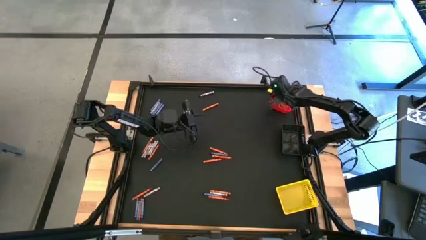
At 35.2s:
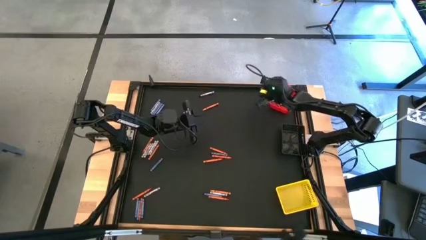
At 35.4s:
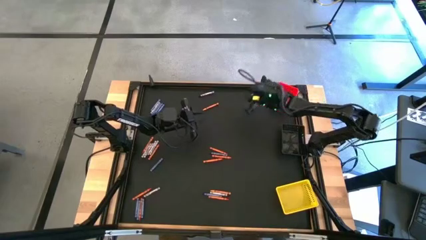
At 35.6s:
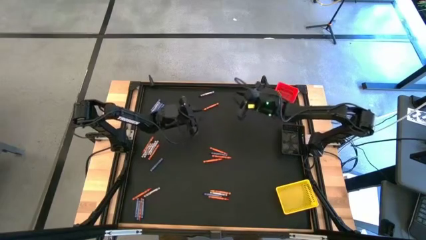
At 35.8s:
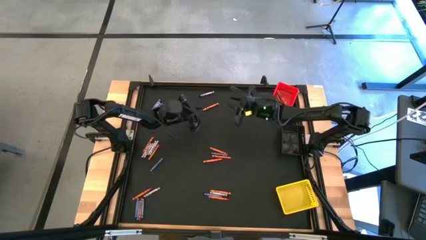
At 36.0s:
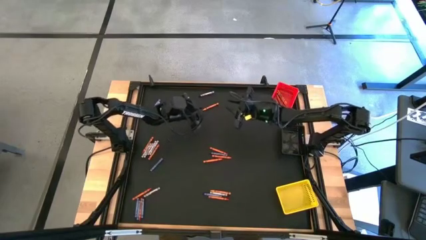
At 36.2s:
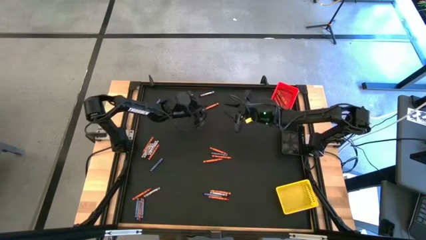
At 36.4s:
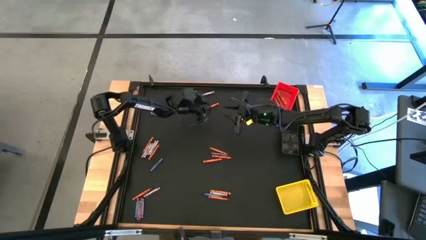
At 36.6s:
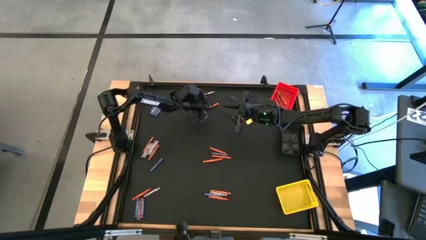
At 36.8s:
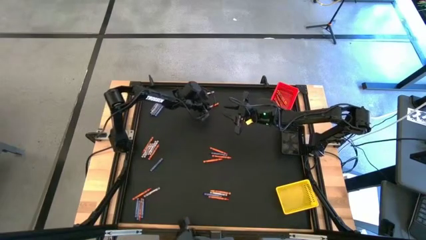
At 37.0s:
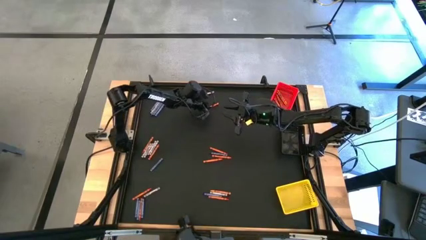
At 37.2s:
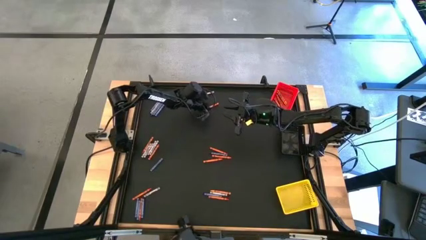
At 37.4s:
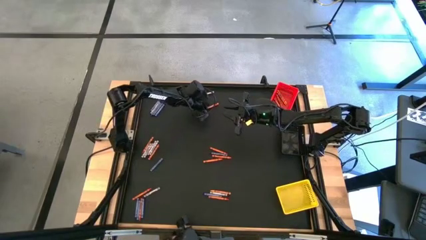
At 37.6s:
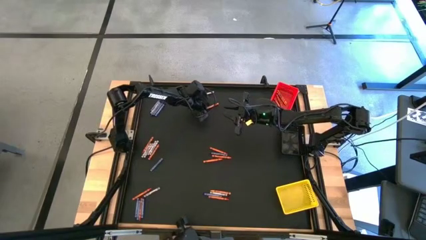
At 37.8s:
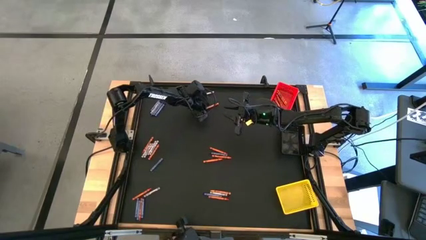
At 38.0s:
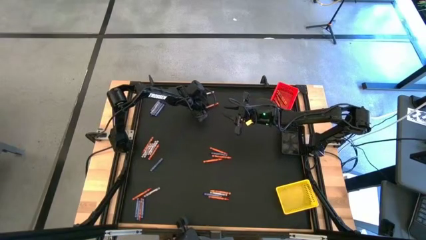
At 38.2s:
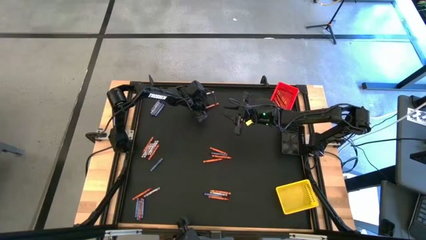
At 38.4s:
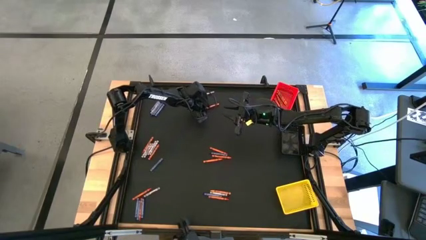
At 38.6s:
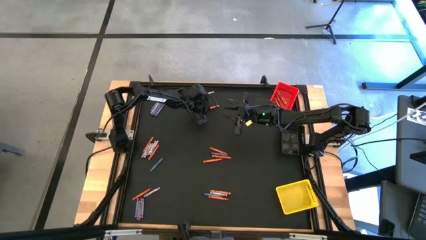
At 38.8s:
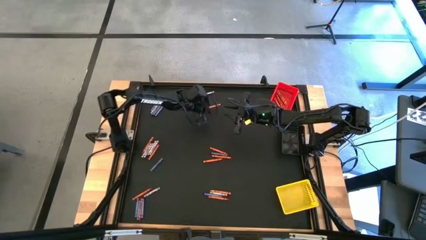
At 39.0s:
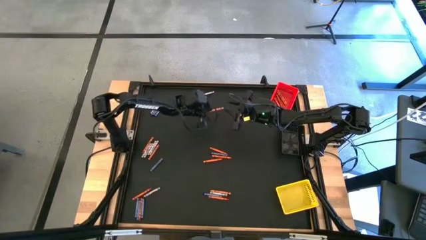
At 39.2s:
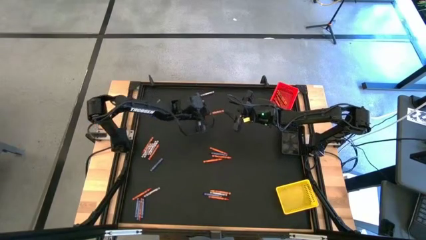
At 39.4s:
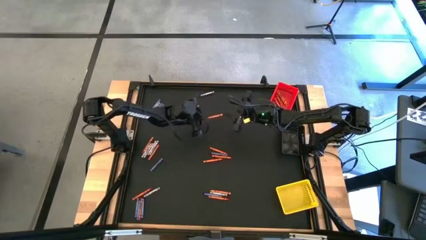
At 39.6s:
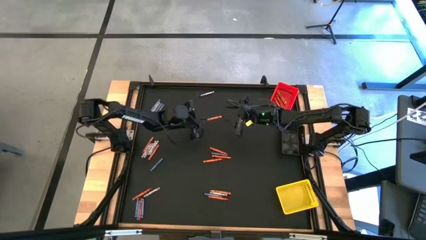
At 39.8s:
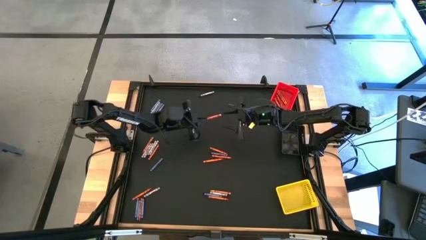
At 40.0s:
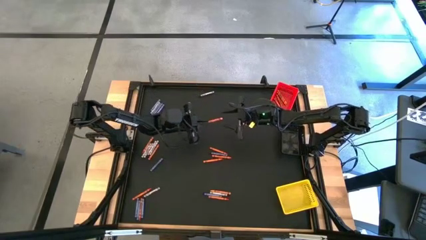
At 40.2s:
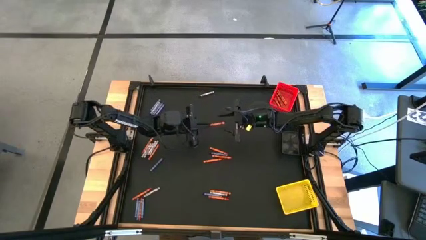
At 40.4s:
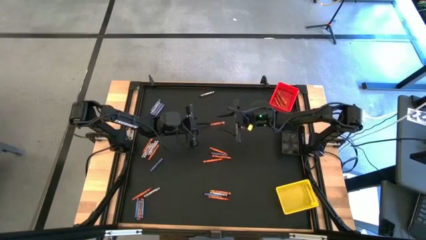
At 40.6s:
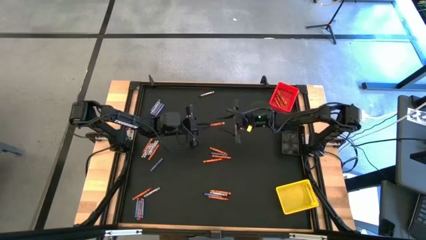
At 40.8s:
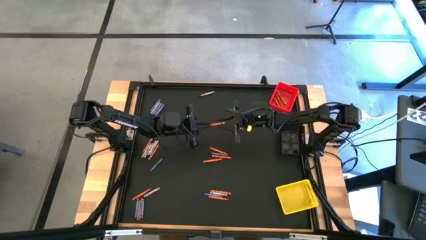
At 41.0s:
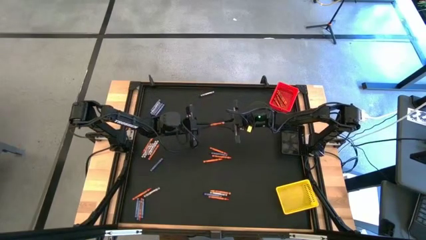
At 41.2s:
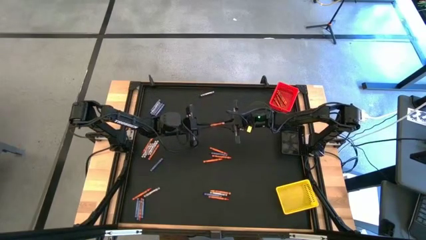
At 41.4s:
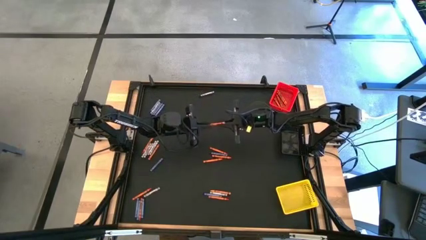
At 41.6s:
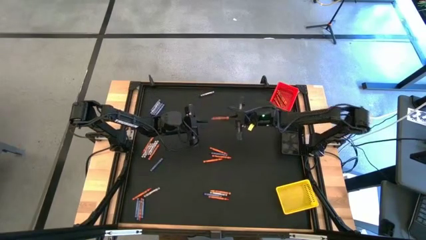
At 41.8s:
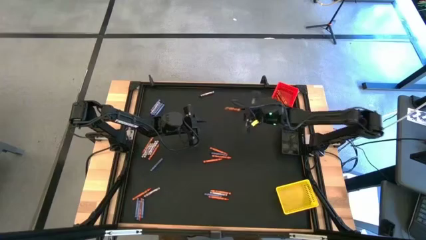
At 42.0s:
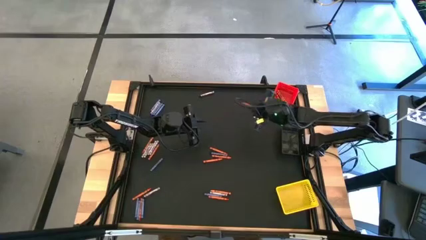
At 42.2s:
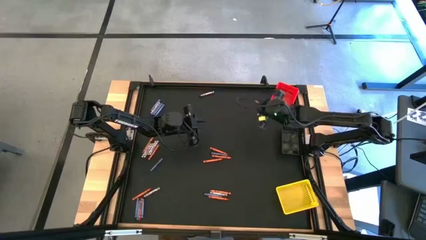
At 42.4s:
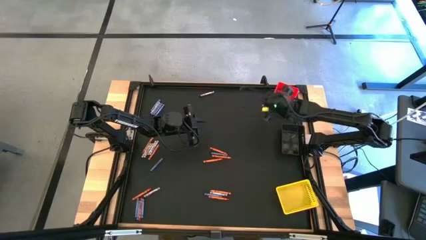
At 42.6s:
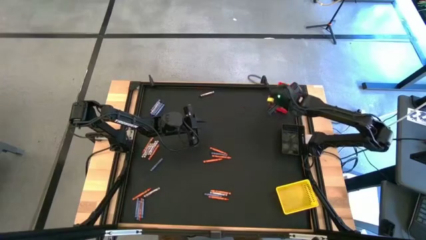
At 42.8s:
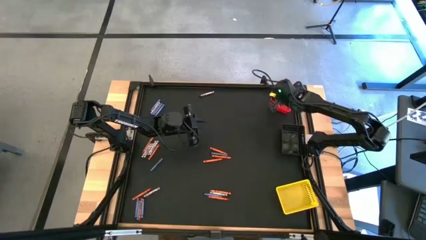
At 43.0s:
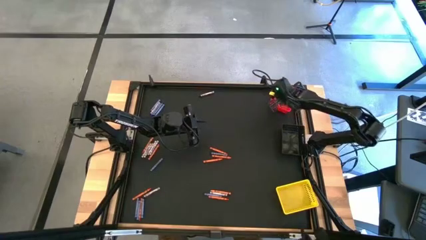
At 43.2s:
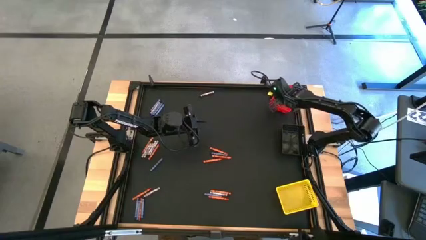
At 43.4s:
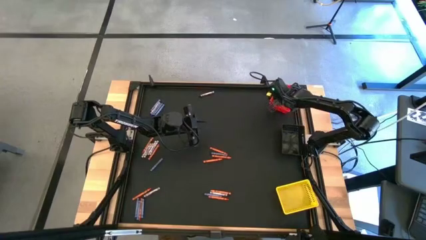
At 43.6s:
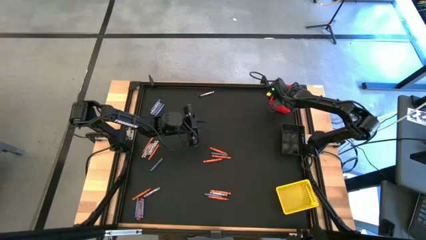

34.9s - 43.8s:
Task: Sort crayons
Put the orange crayon into the red bin

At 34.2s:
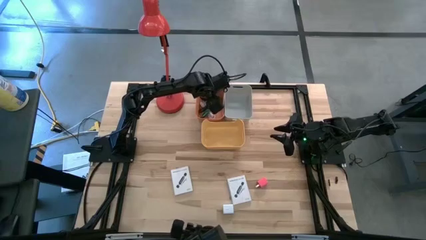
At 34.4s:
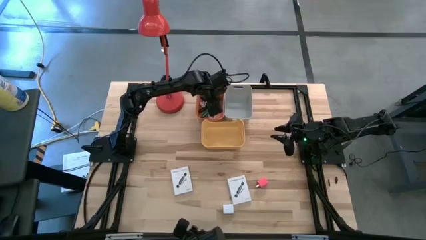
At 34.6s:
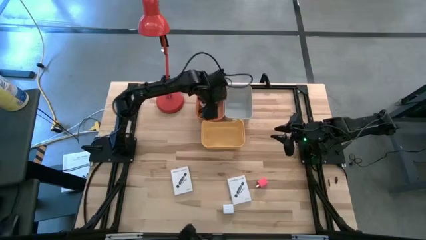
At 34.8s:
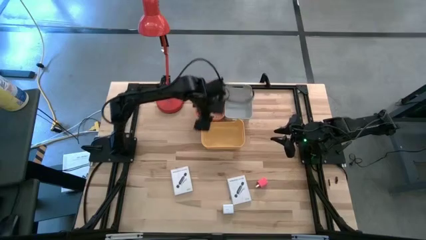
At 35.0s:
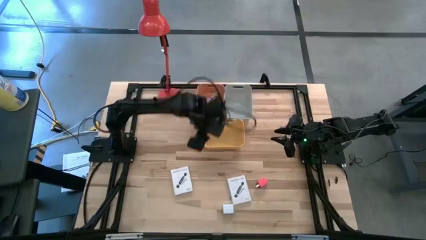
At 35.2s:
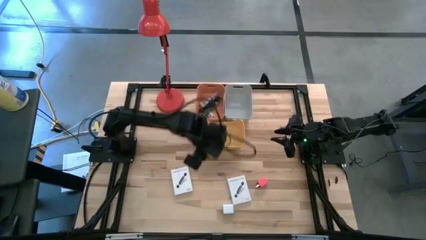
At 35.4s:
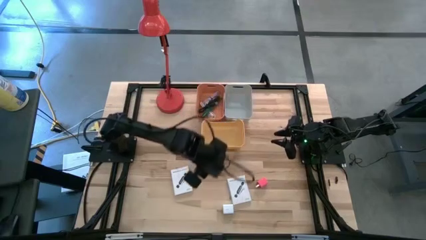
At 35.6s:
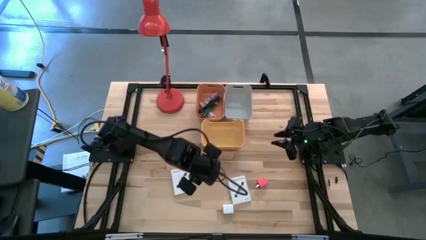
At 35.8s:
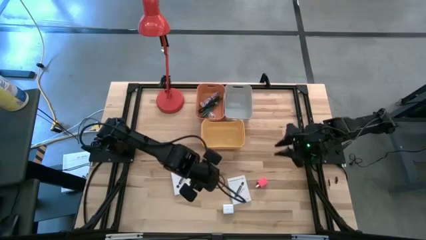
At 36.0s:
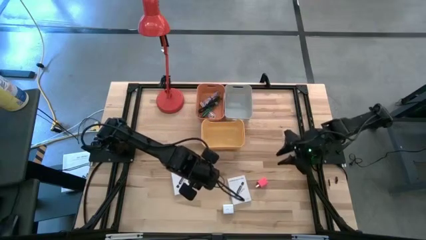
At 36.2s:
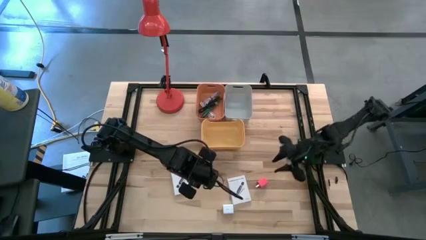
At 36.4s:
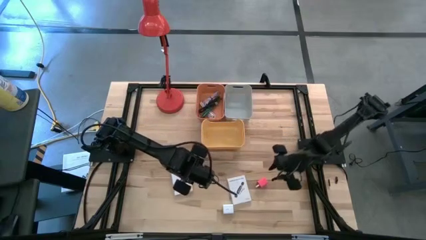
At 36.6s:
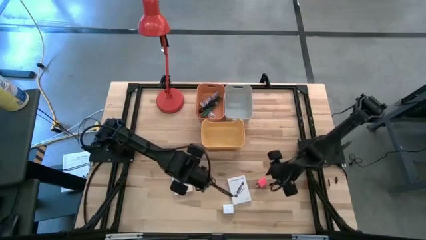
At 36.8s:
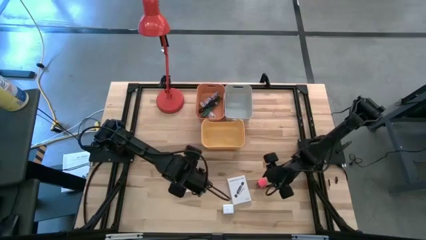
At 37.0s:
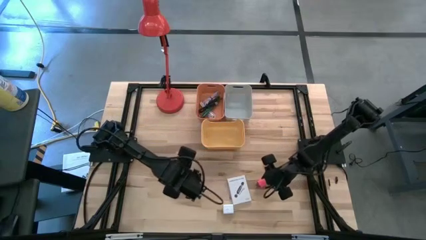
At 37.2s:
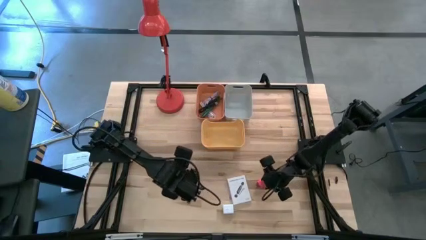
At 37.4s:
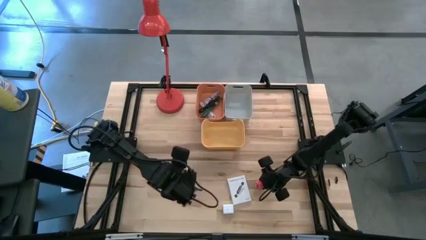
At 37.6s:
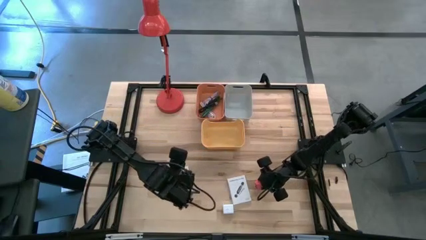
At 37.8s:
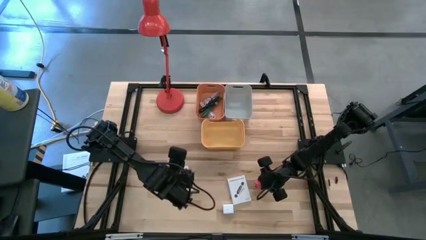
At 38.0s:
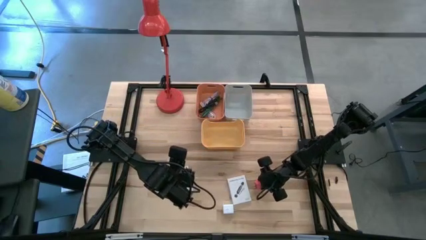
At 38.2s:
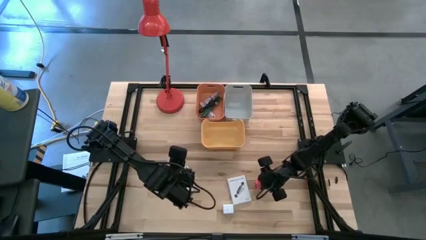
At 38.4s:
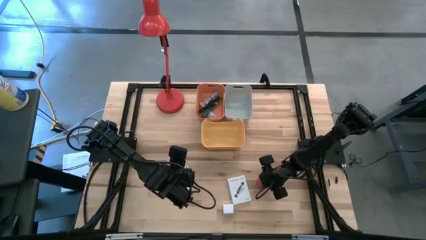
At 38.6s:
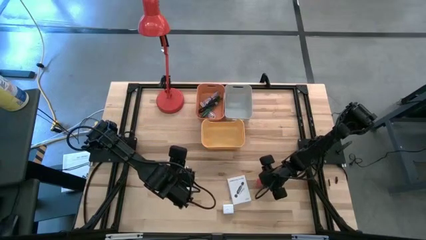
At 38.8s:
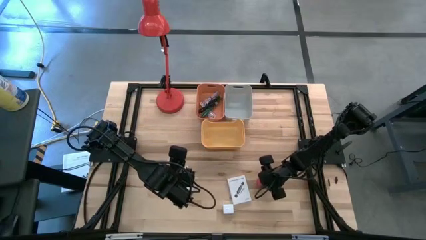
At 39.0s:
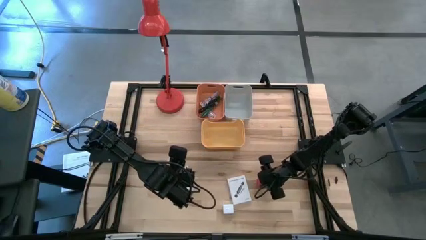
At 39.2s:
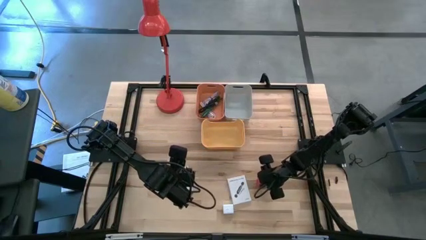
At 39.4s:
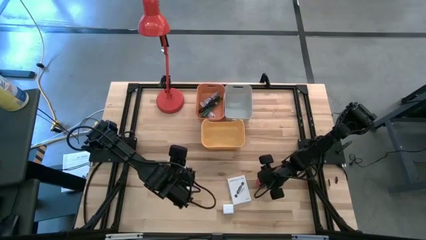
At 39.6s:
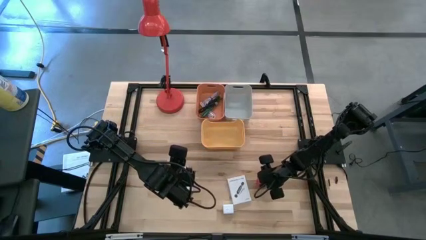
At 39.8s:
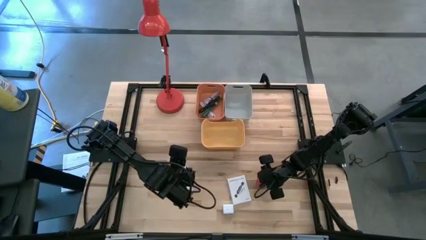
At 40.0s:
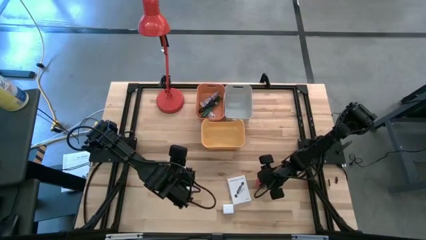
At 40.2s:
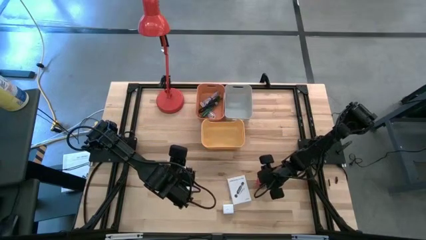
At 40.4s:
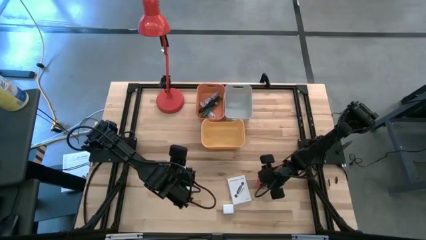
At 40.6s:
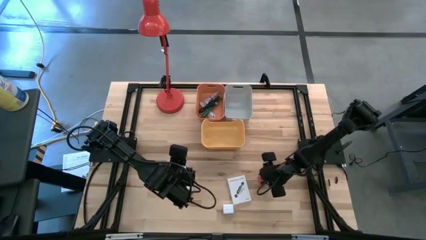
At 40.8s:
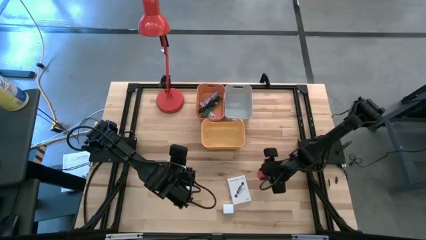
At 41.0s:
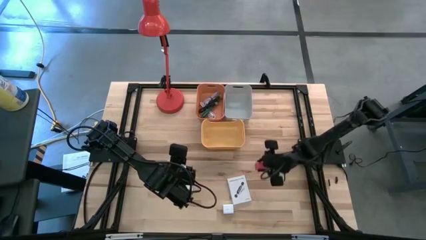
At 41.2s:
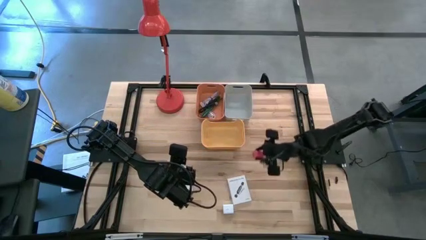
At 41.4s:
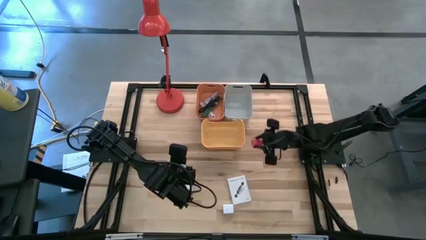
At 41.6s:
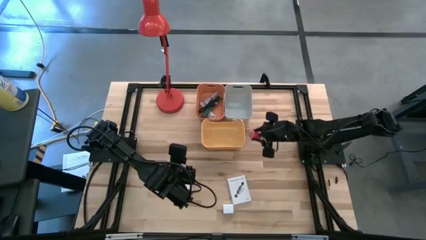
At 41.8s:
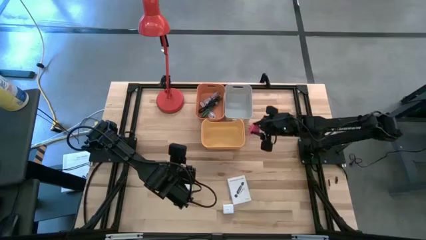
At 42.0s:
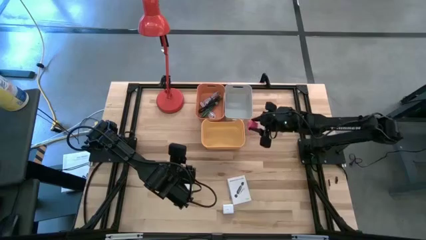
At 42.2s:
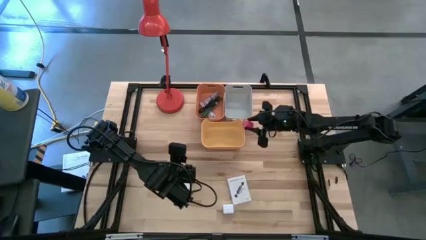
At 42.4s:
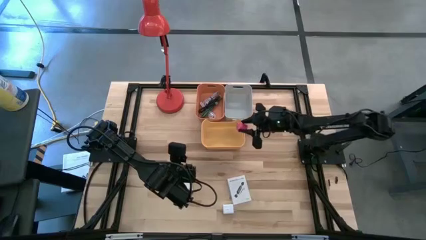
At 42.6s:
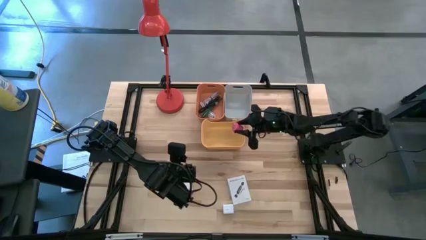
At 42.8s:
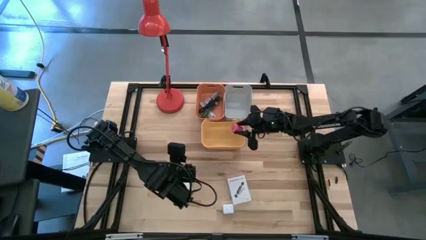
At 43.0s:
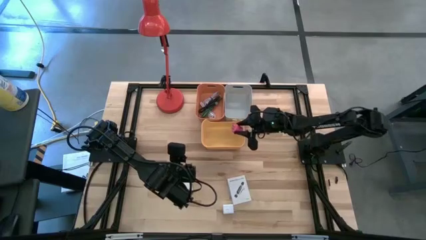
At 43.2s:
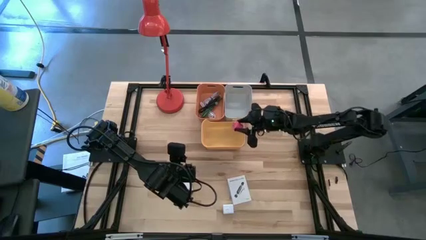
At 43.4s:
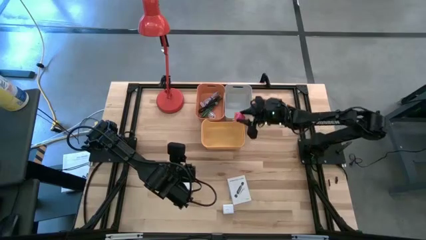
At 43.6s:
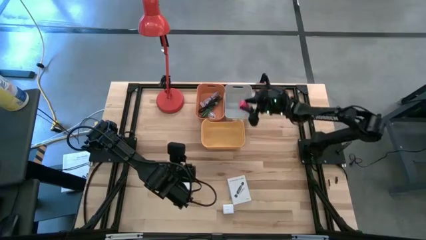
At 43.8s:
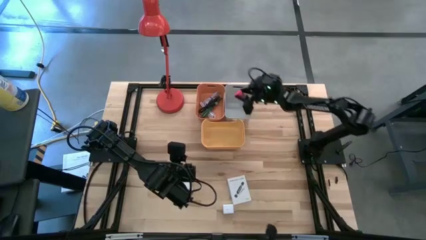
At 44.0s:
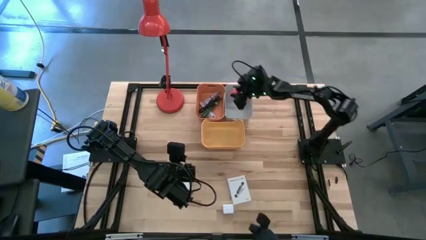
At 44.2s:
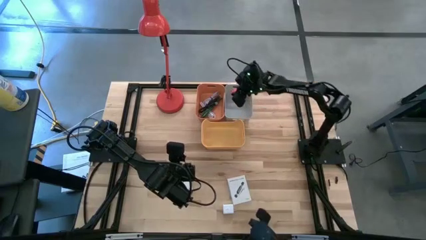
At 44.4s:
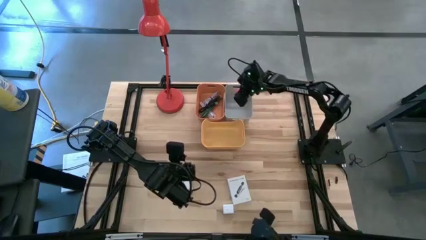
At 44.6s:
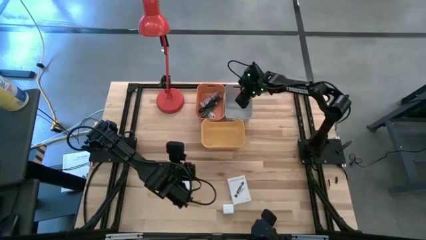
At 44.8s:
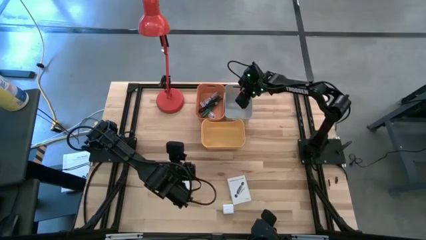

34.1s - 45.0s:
Task: Pick and place items into bin
Put the pink charger adapter into the gray bin
